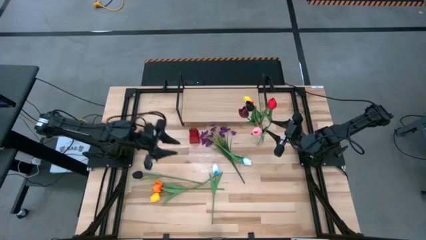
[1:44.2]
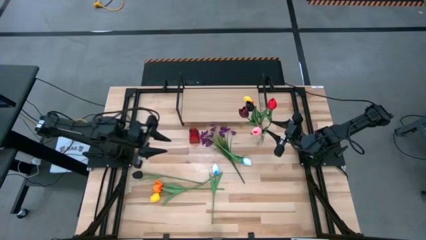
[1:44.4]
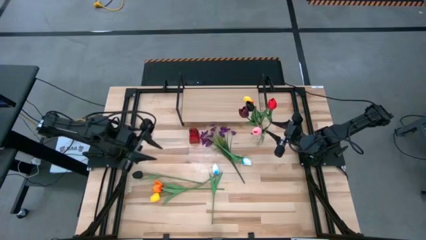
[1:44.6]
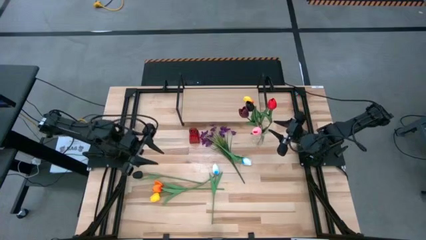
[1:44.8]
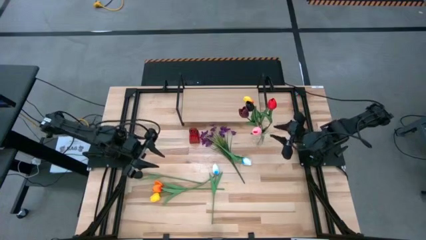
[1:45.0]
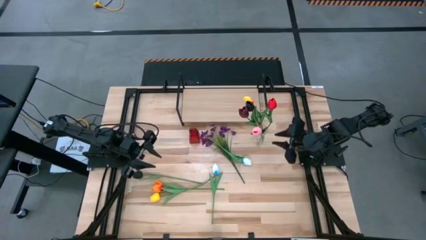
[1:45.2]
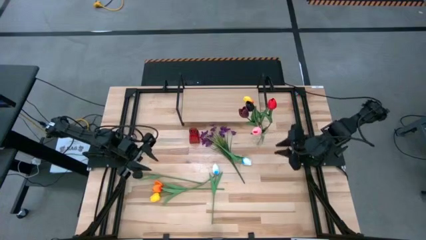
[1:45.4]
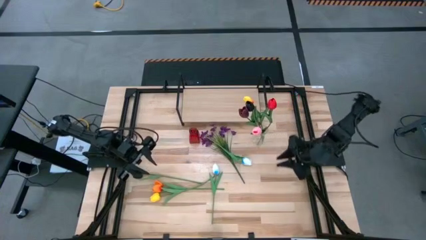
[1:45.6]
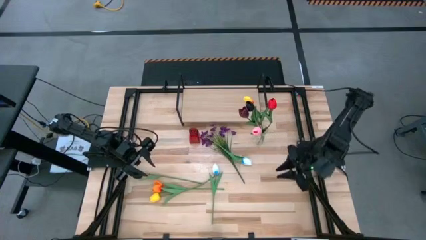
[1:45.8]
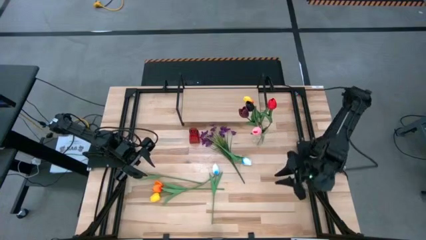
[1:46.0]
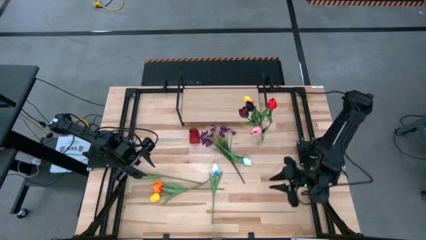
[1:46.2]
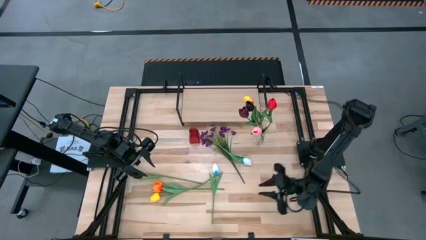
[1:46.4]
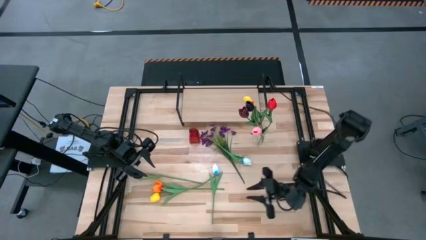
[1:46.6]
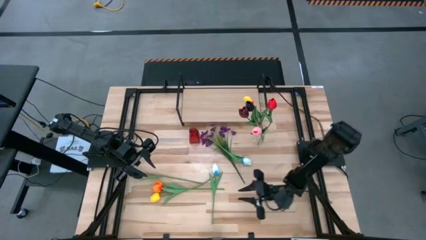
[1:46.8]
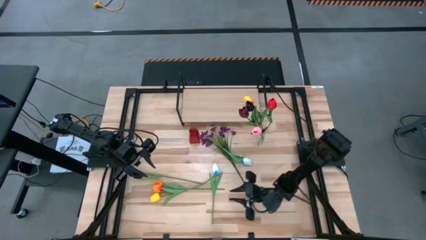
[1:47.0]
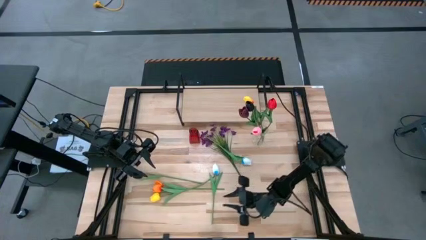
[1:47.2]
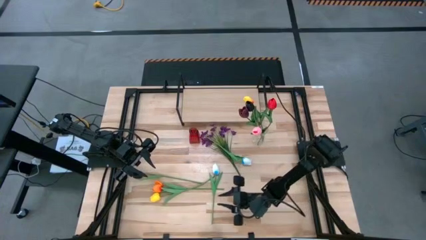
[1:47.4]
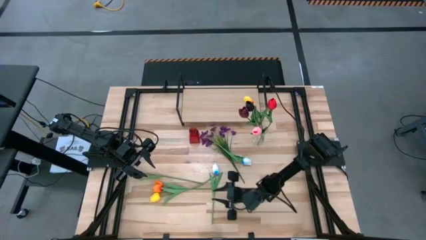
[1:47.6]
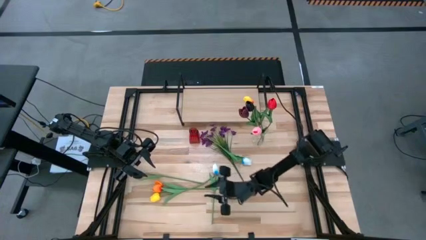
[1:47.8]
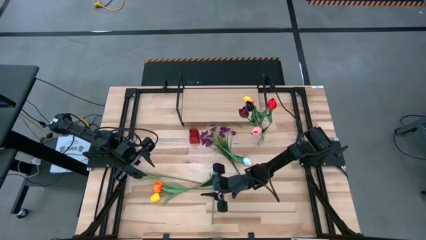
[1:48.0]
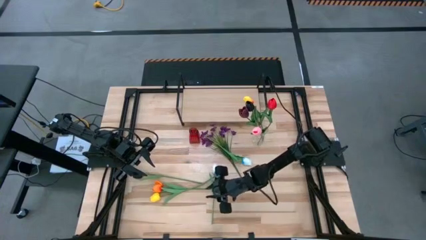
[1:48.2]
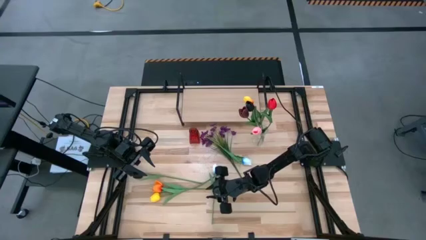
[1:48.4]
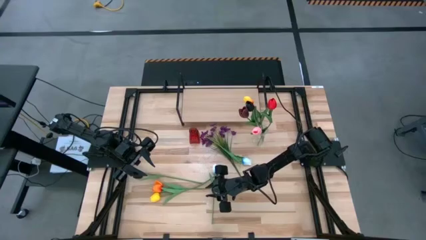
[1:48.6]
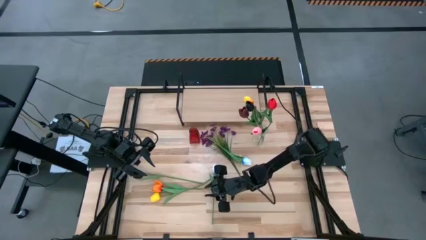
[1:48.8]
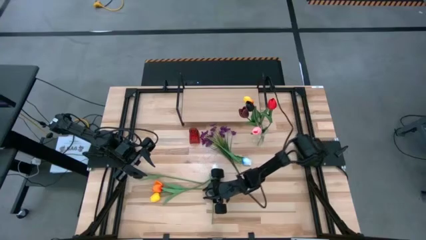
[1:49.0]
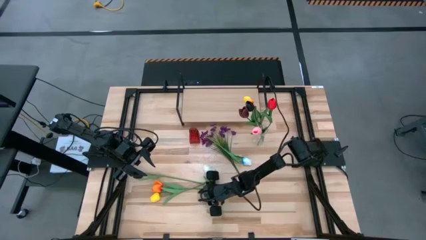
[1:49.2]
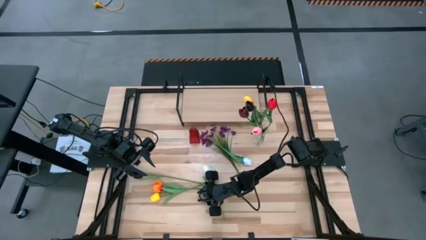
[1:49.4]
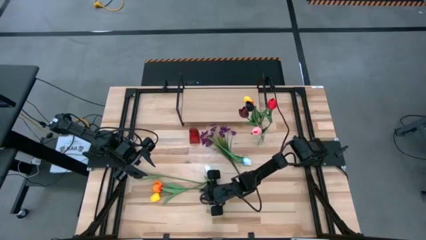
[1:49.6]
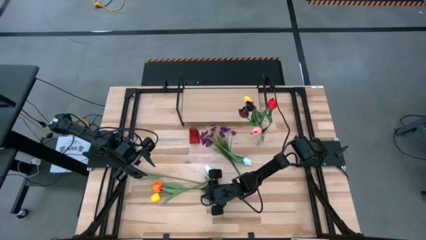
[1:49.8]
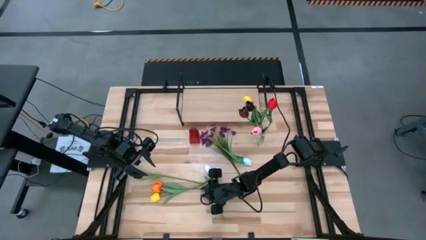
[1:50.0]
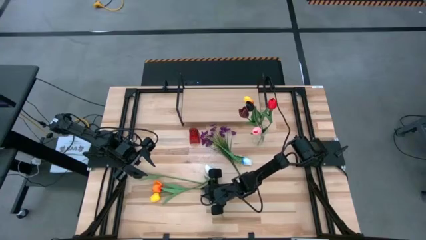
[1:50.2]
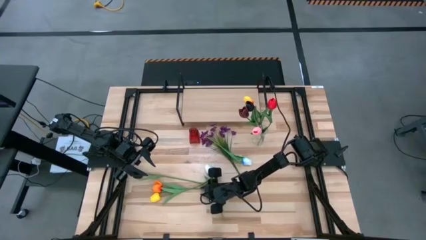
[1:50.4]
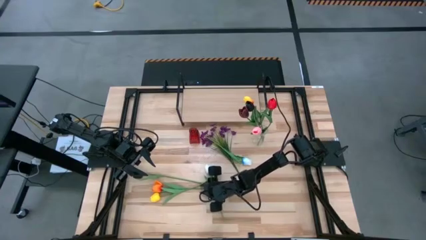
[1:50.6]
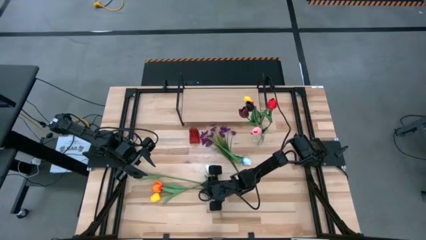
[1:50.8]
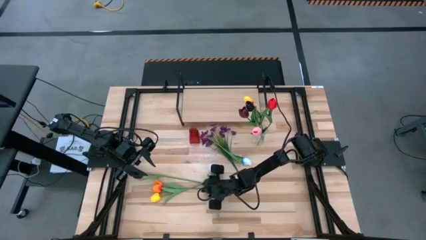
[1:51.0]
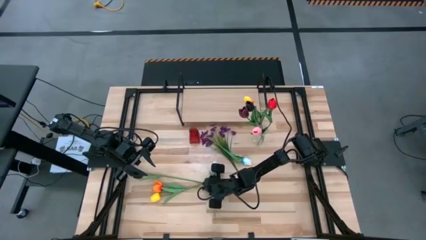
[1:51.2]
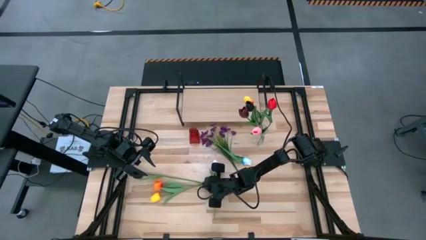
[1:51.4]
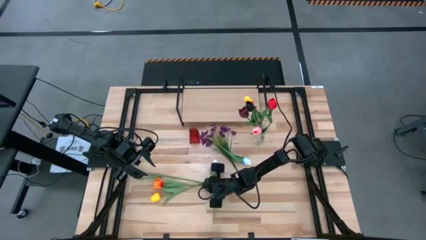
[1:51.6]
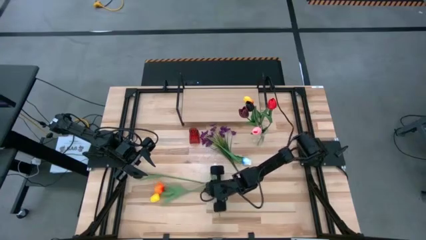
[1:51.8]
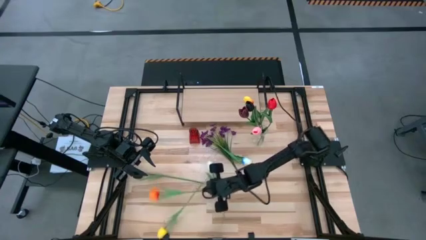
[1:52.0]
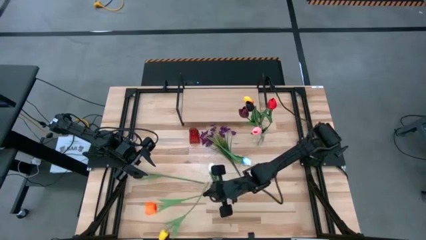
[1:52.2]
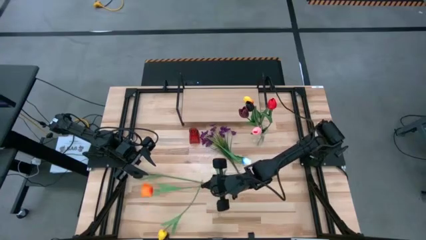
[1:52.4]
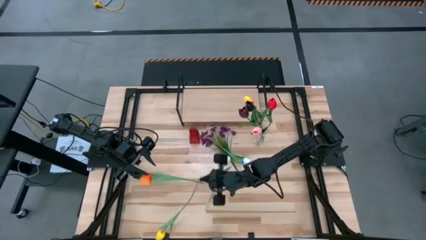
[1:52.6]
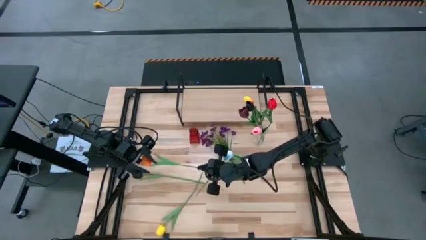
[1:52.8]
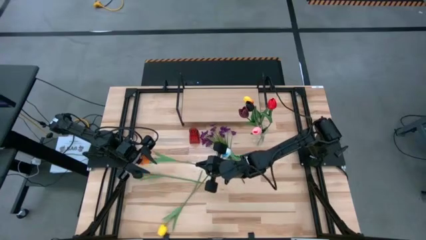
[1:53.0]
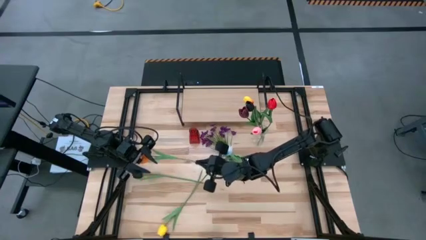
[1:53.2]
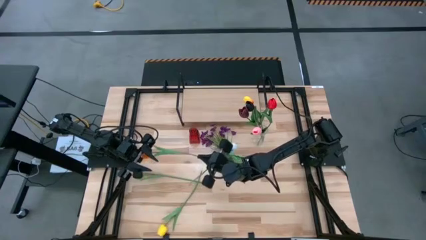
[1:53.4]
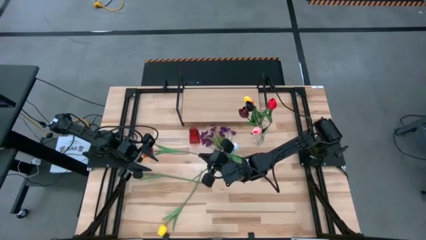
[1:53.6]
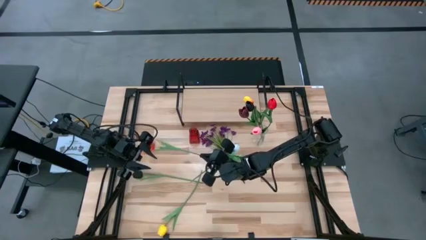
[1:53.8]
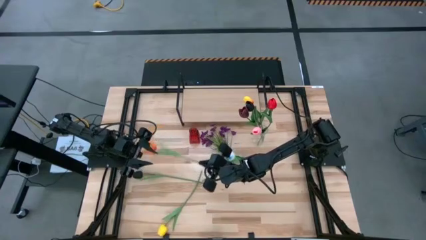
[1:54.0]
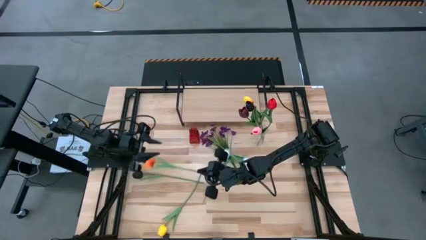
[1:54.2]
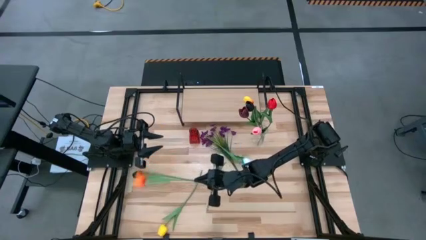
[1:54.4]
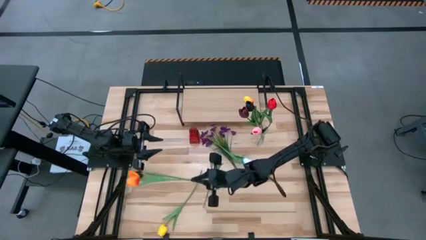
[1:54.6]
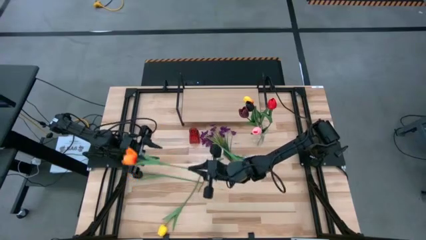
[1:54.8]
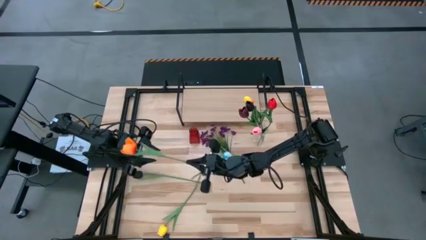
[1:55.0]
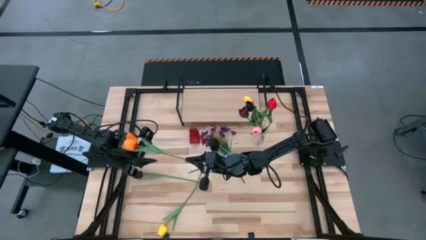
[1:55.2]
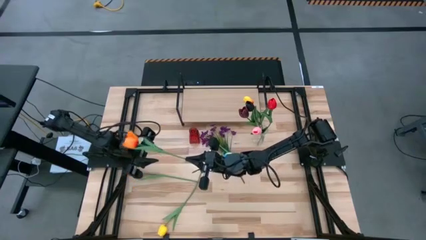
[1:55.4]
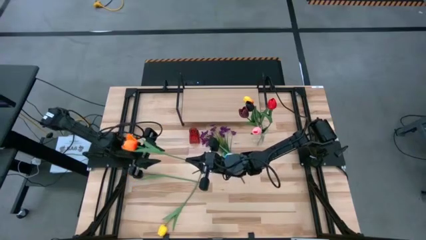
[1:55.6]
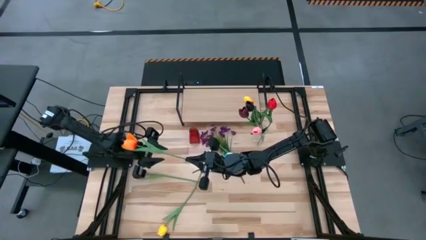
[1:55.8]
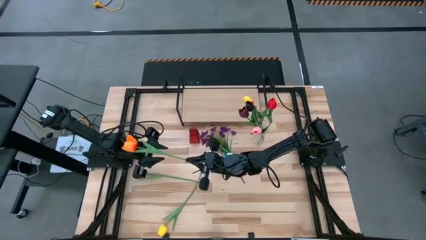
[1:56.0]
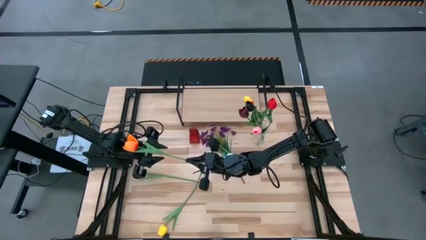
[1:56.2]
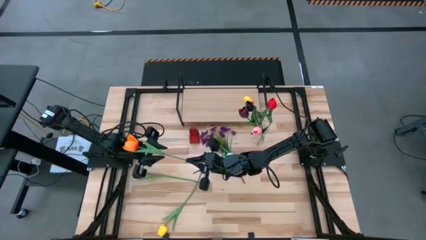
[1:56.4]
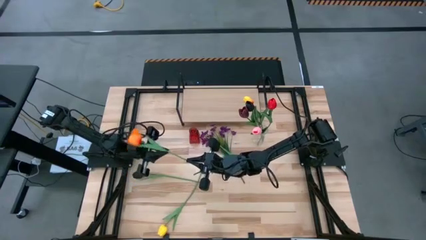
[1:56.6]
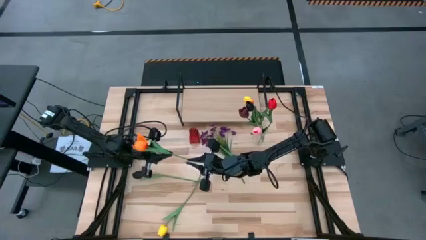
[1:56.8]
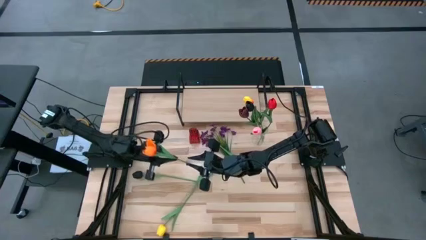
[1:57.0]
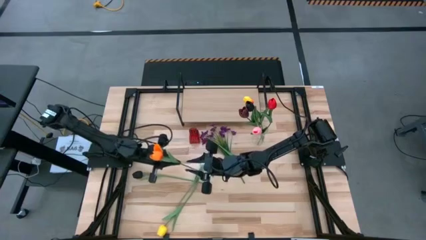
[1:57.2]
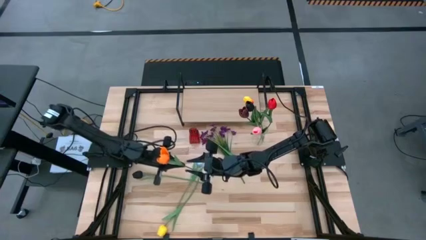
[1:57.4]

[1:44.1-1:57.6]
Task: Pick and place flowers into a vace then onto a shelf
Put the orange flower into the transparent vase

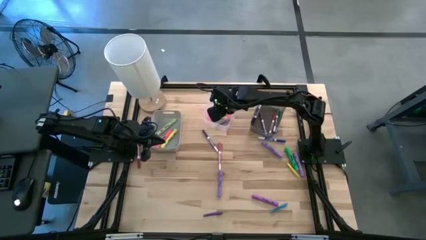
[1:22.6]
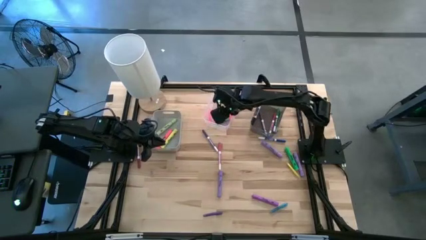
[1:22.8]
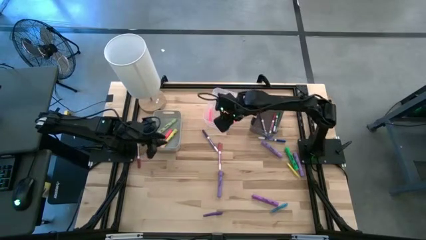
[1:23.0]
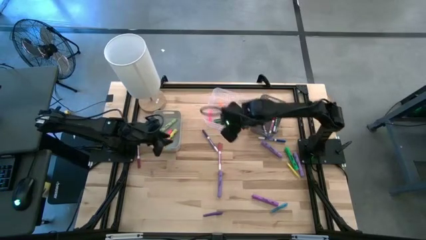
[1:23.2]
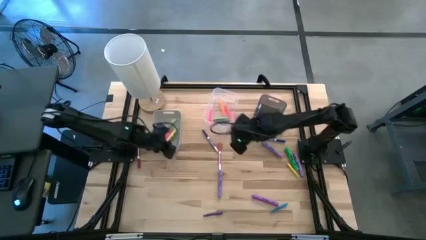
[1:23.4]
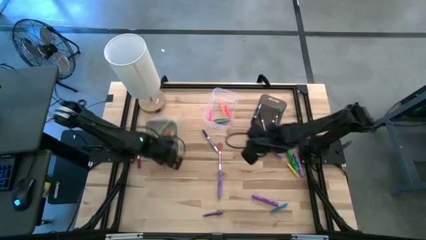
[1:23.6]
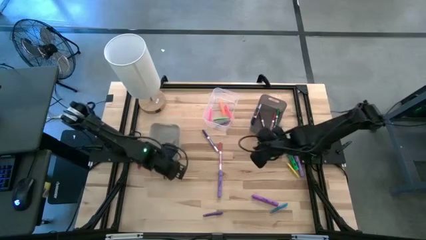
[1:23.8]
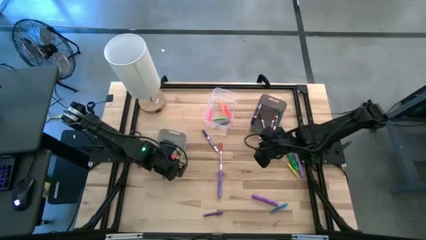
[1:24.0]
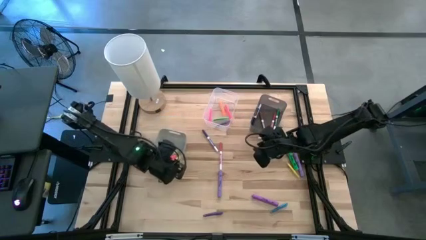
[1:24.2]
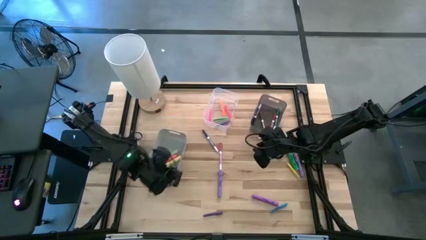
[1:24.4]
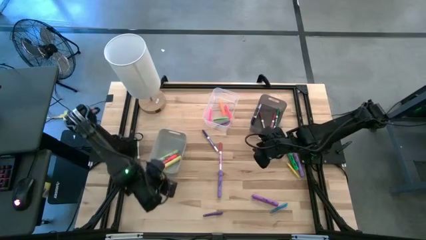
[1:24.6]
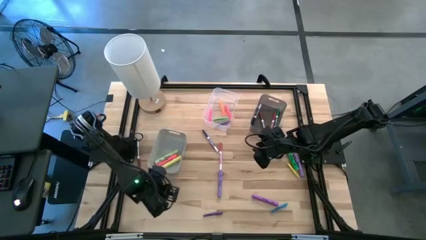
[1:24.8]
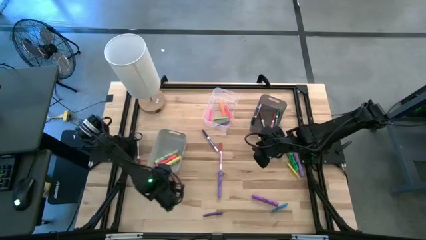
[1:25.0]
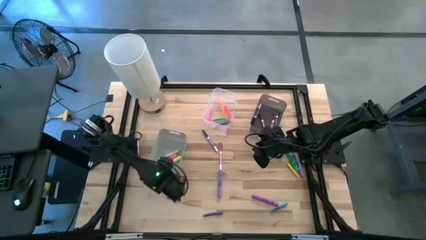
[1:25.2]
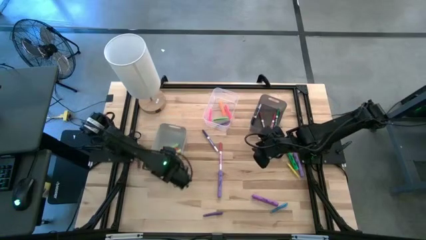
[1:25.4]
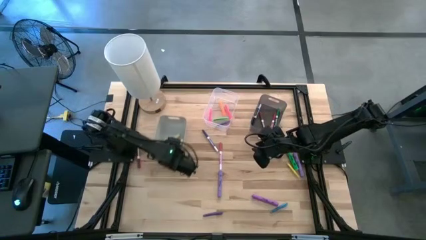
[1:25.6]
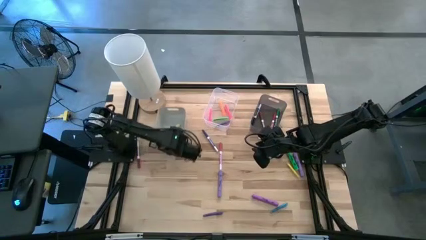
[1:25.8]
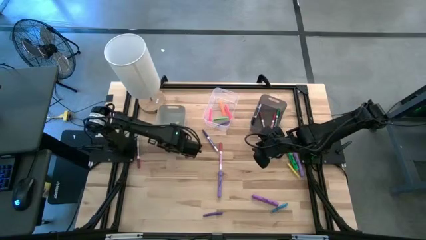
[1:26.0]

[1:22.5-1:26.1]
Task: Pick & Place Markers
Adjust the gray bin on the table
